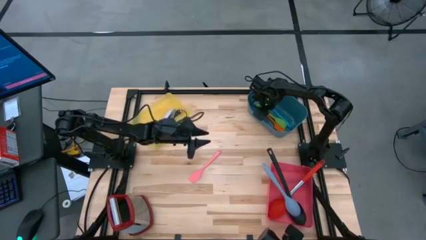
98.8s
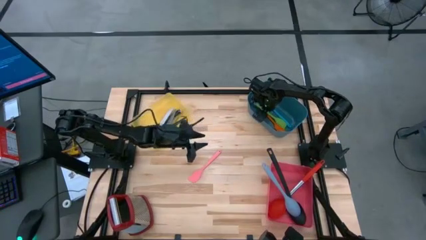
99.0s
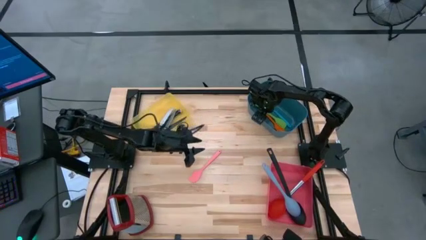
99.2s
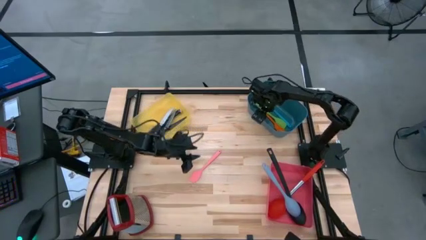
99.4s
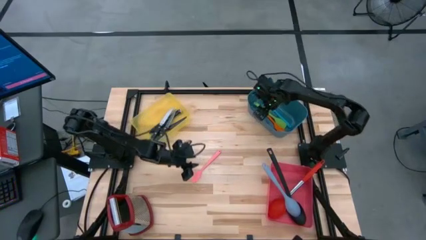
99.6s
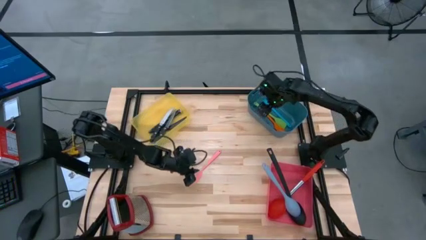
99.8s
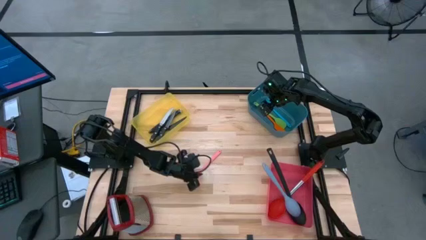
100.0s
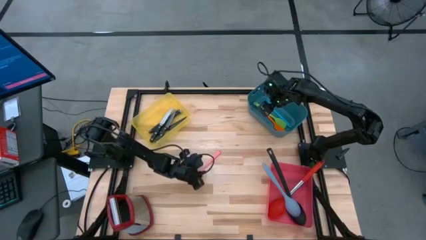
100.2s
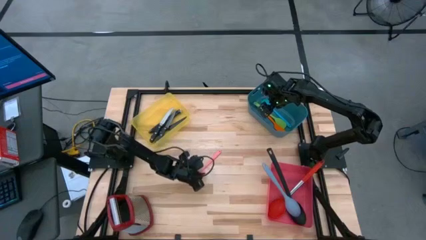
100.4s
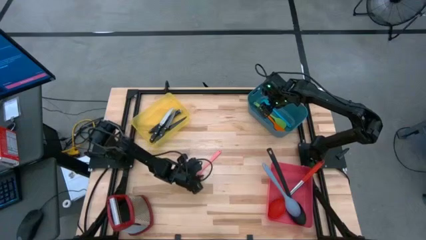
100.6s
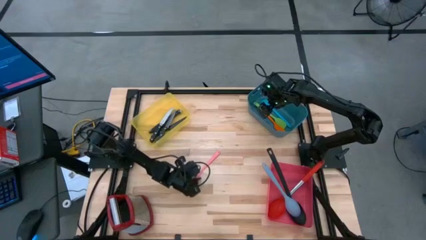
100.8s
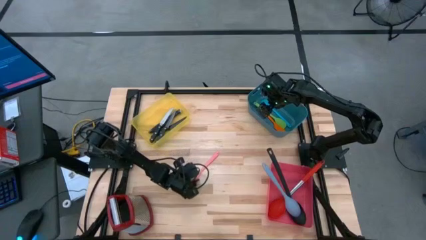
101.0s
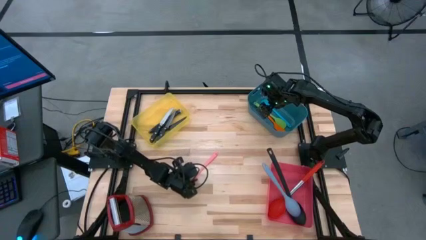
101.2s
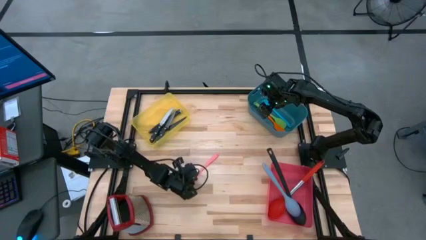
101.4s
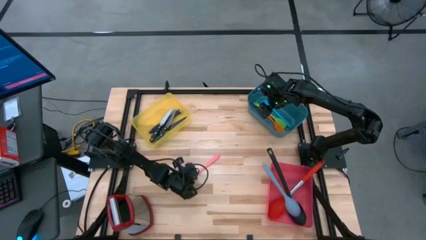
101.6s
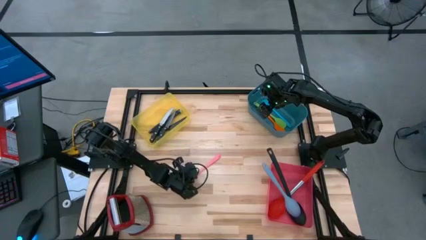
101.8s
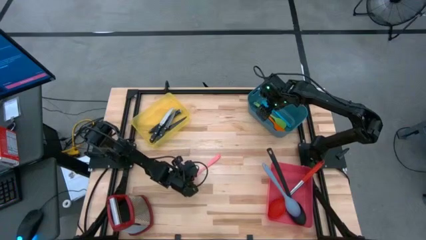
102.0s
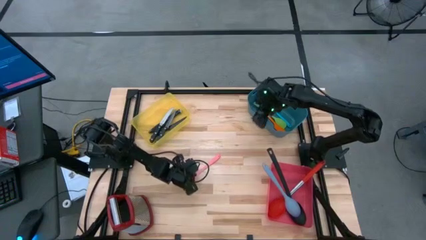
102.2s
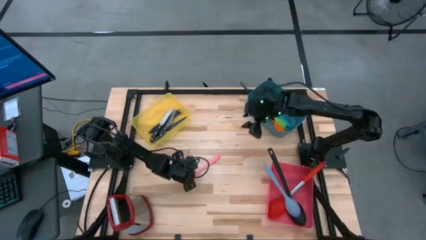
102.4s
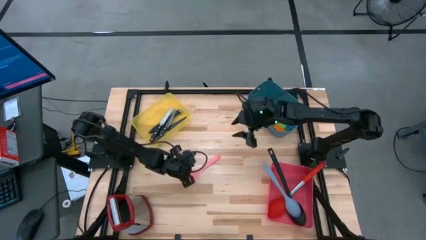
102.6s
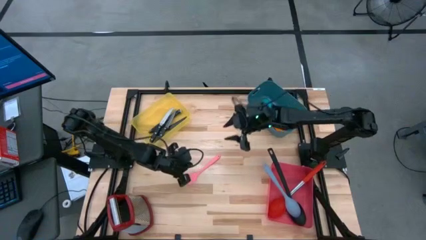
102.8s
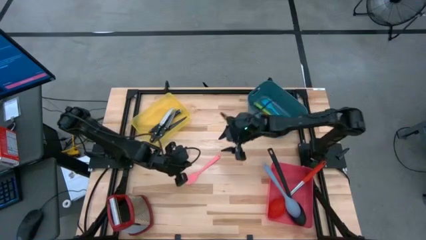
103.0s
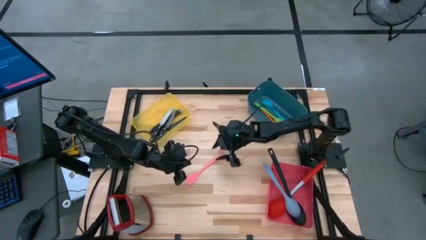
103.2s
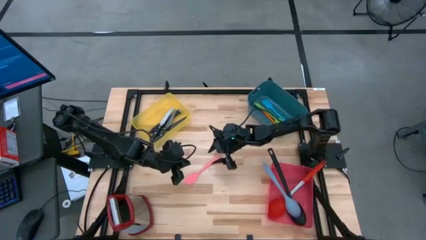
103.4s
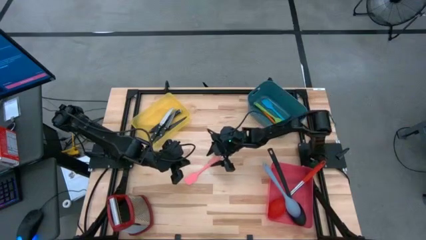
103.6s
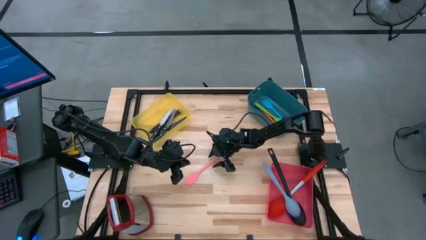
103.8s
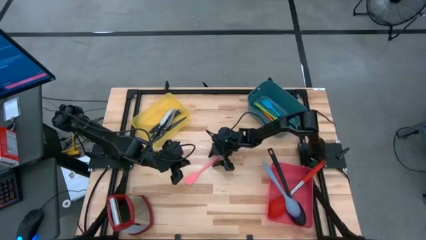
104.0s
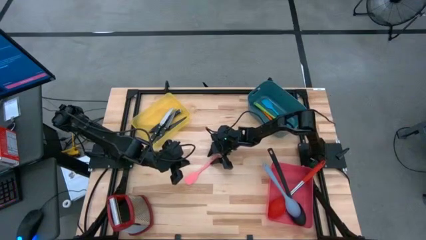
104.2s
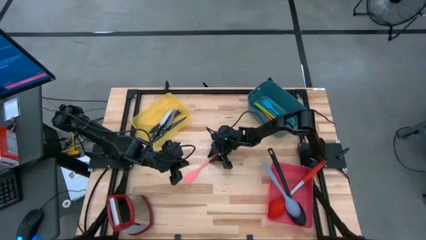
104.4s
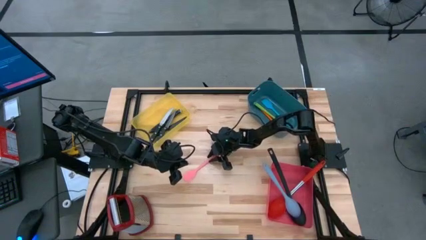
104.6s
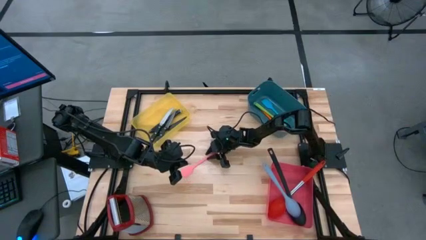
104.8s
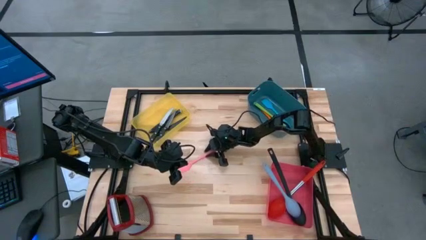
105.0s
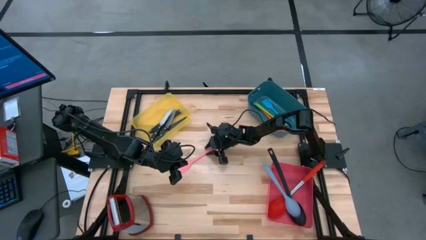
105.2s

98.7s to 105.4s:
Task: Pick & Place Kitchen Items
Put the pink spatula into the green bin

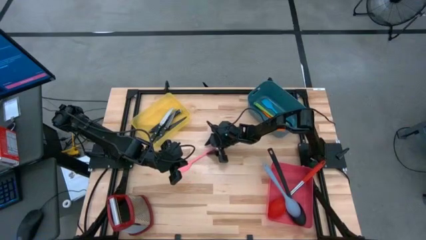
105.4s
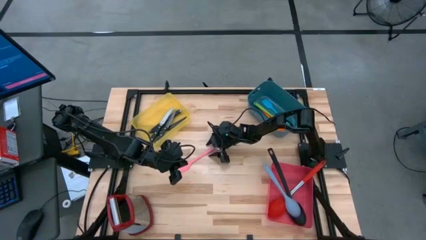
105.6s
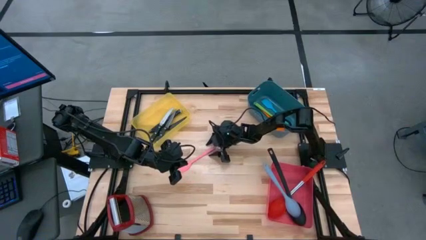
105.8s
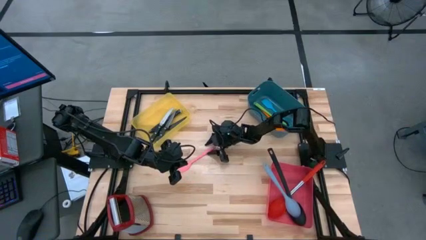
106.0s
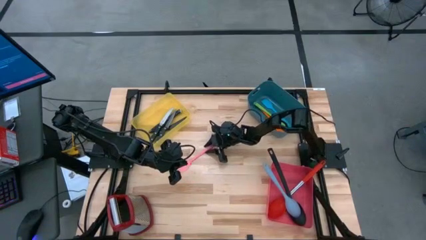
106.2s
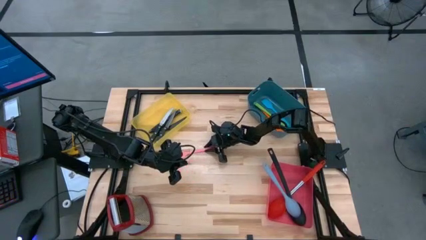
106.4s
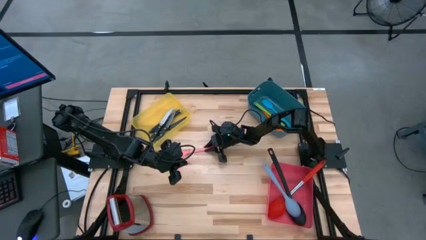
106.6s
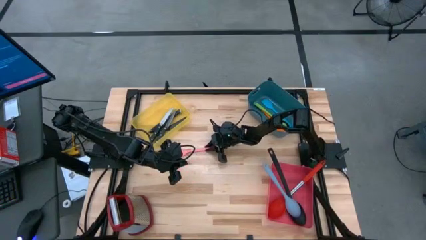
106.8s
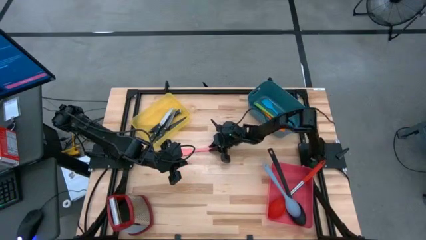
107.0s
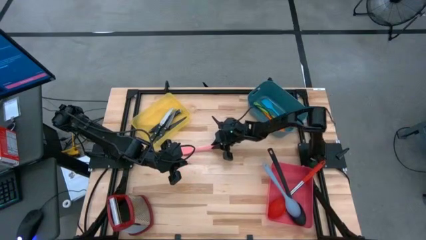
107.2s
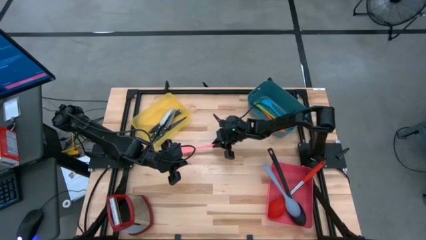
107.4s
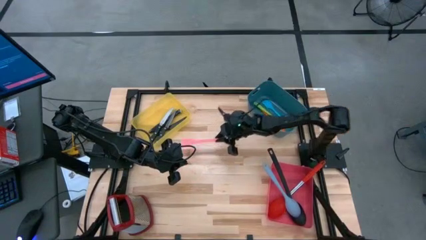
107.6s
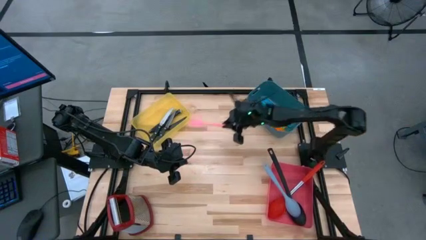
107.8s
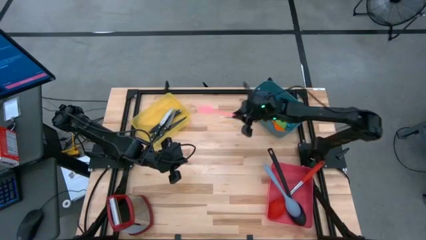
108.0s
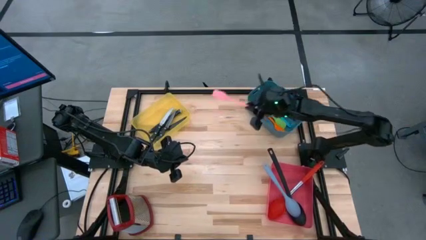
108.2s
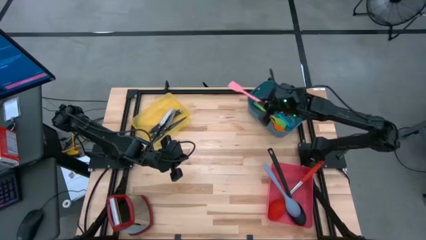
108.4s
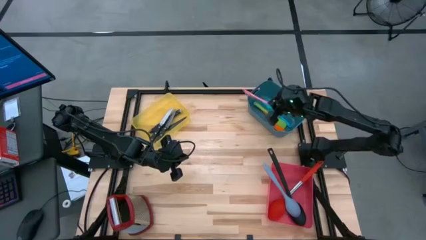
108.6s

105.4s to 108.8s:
Put the pink spatula into the green bin

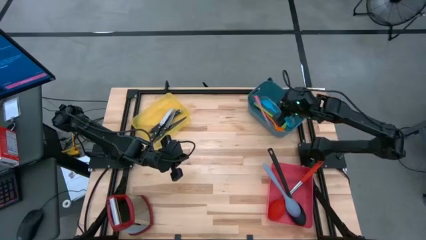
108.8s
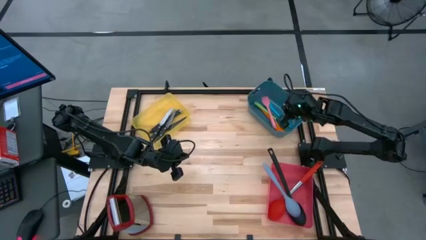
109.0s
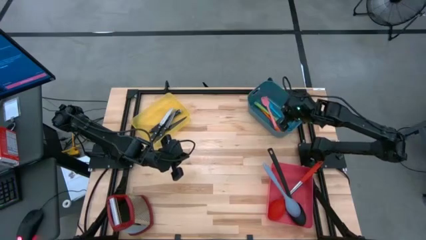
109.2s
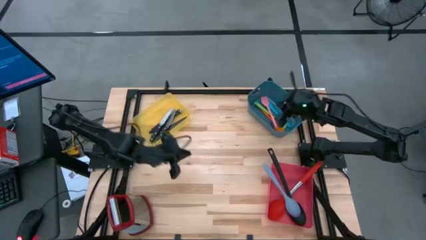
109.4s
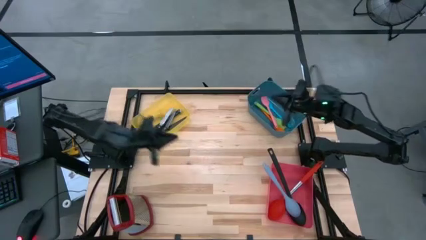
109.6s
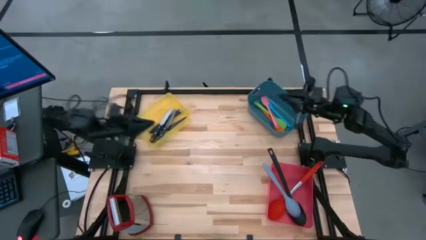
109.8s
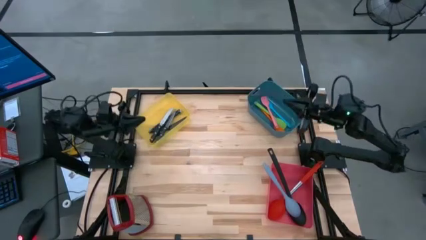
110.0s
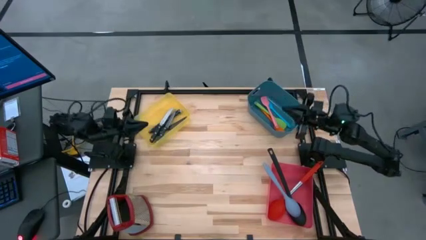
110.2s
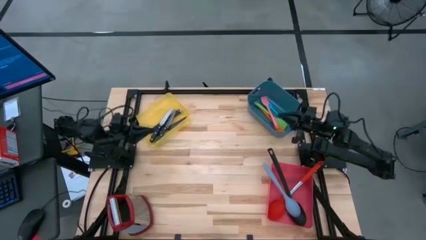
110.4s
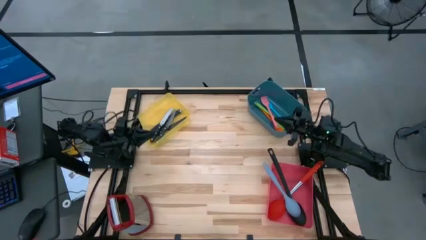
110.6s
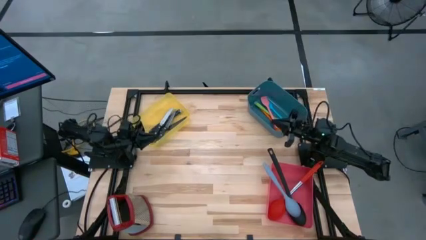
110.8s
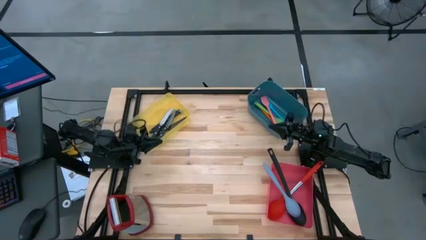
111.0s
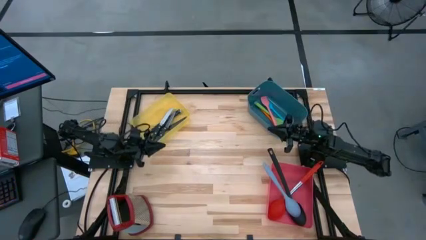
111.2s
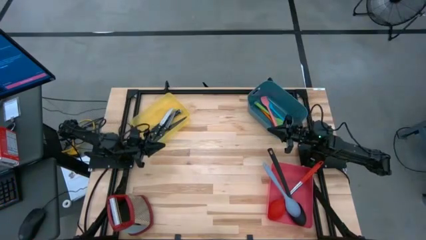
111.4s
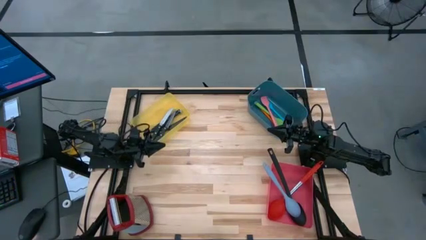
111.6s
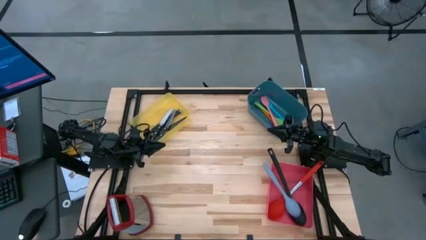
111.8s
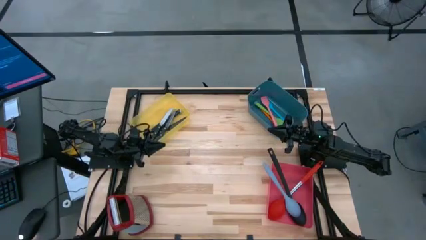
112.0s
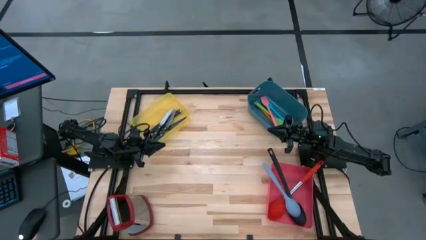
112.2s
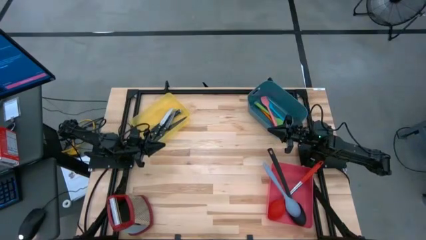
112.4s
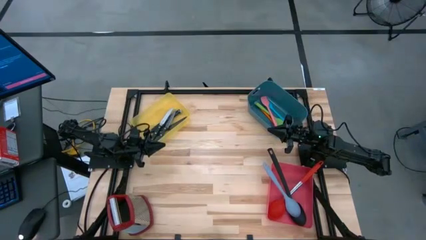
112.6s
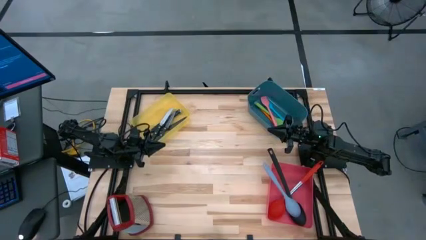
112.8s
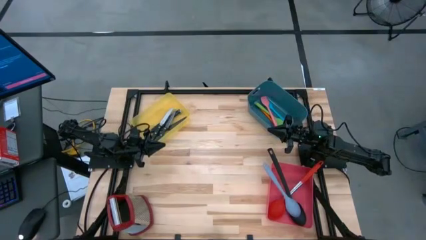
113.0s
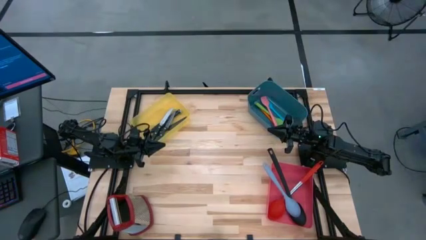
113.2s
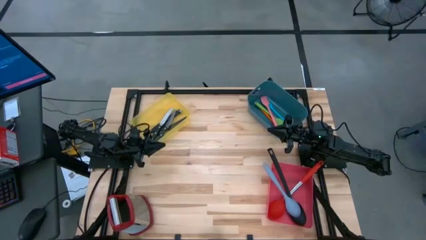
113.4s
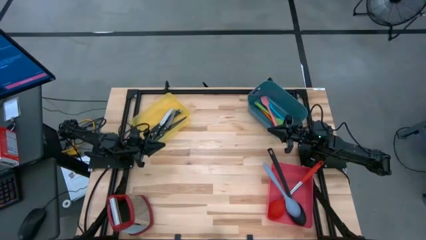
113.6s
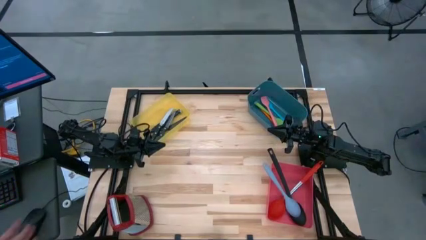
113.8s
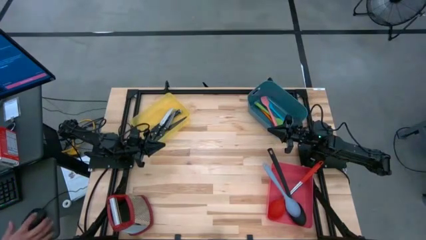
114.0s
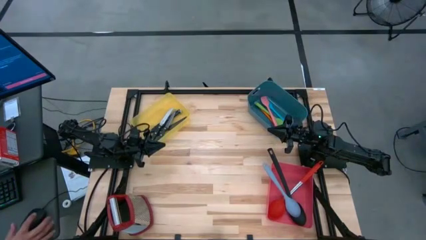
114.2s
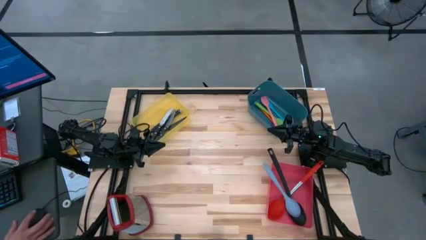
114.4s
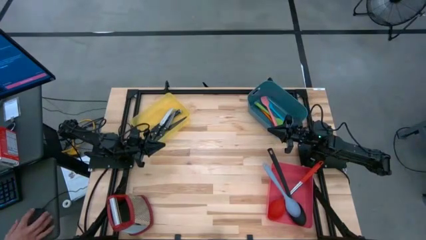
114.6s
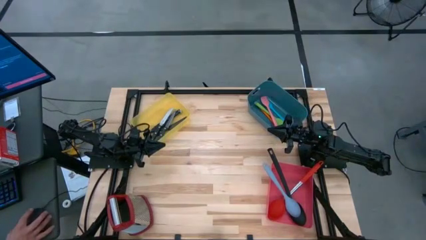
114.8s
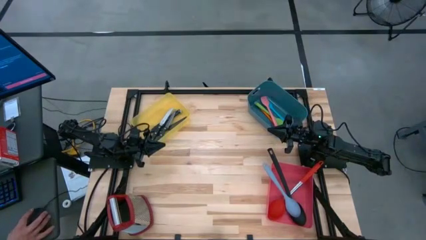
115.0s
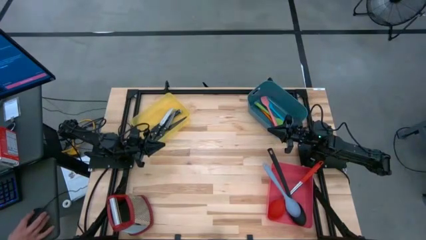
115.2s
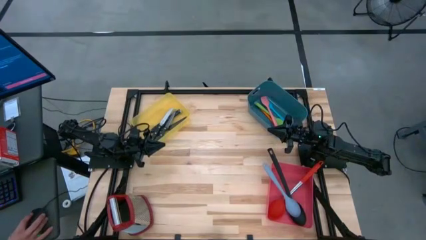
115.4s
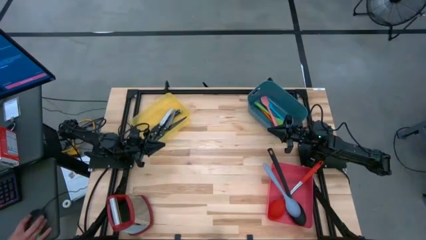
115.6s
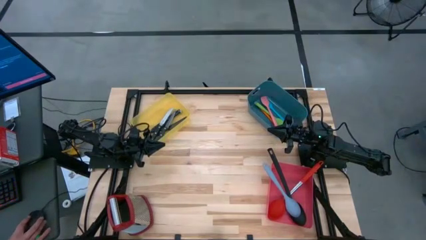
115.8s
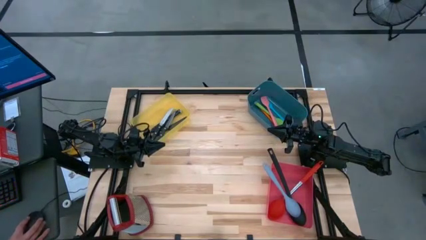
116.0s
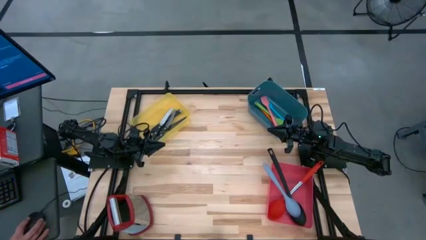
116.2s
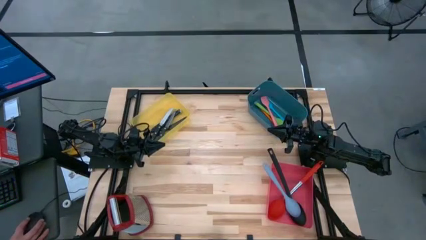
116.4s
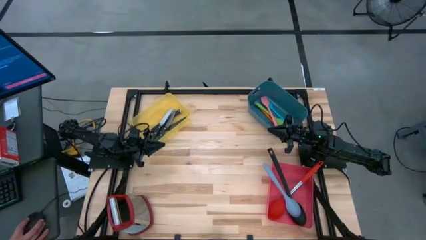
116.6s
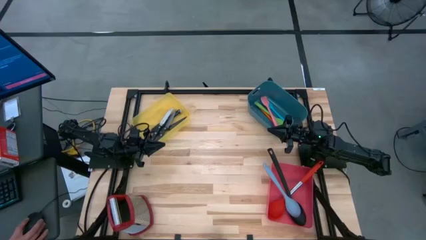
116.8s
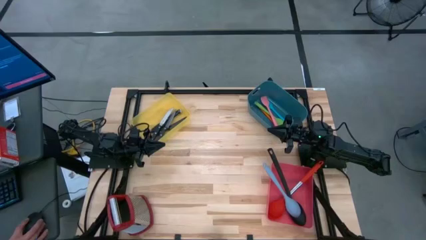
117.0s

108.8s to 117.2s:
Return to Home Position
